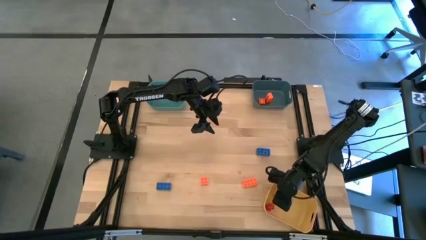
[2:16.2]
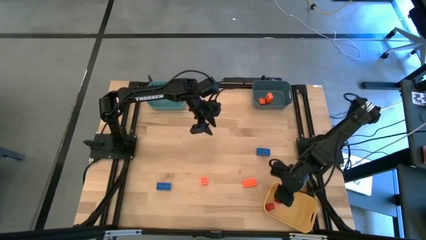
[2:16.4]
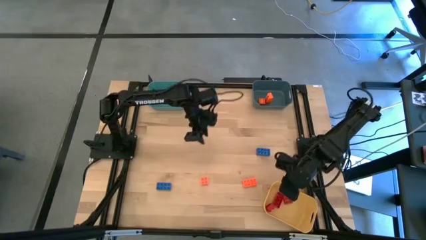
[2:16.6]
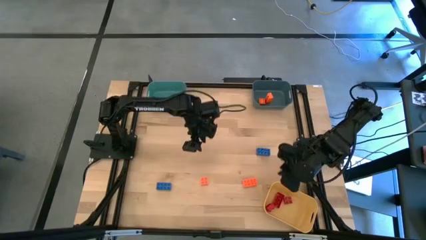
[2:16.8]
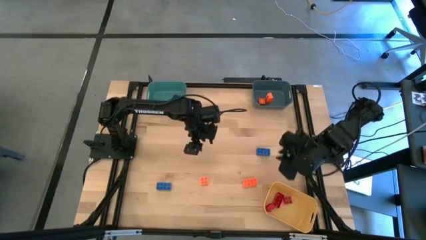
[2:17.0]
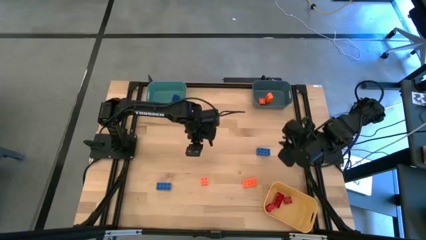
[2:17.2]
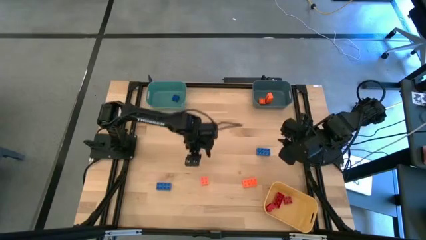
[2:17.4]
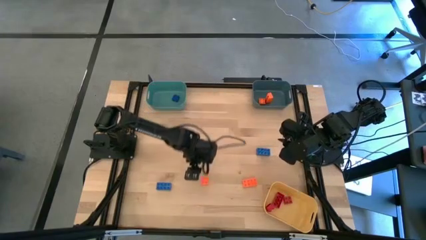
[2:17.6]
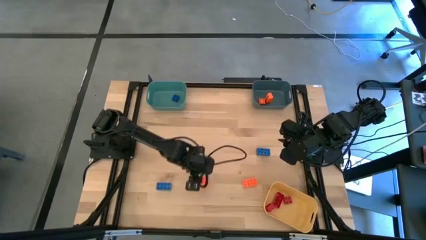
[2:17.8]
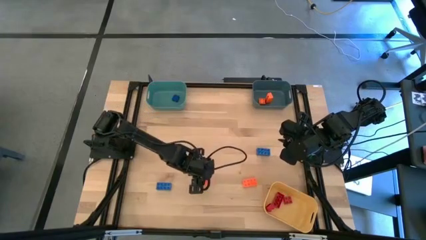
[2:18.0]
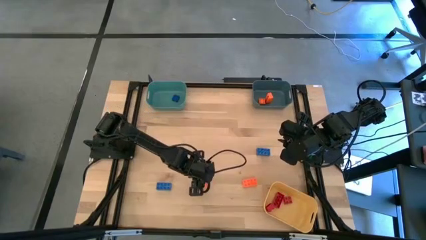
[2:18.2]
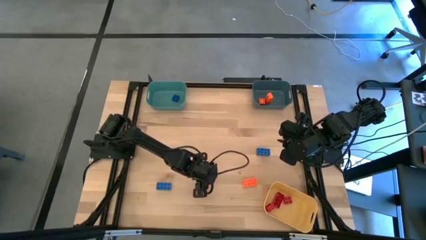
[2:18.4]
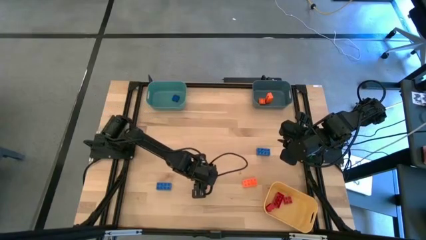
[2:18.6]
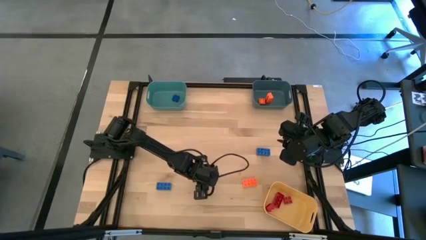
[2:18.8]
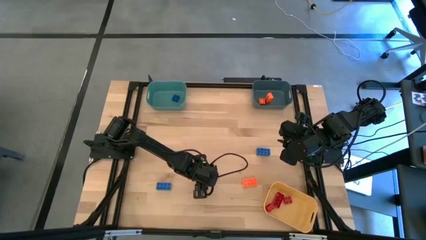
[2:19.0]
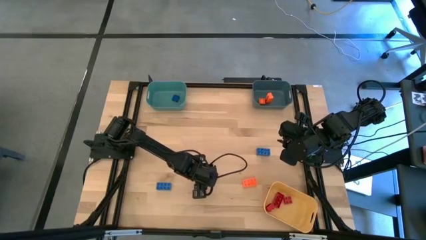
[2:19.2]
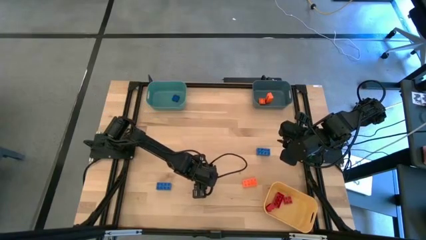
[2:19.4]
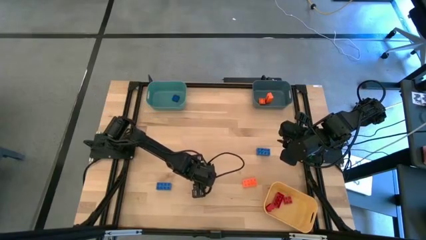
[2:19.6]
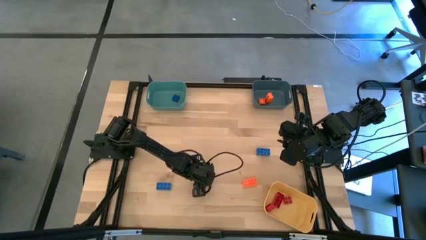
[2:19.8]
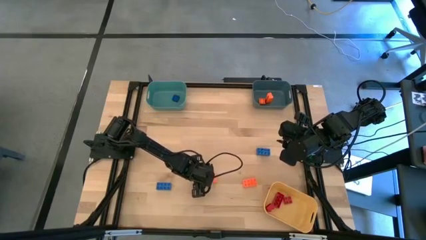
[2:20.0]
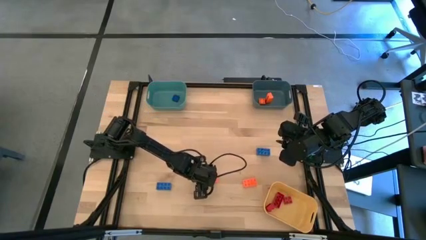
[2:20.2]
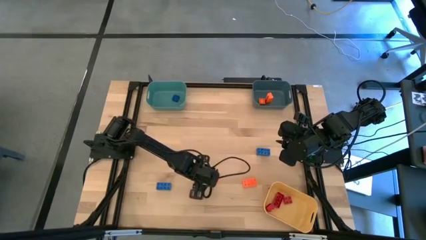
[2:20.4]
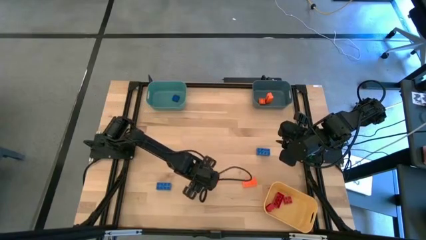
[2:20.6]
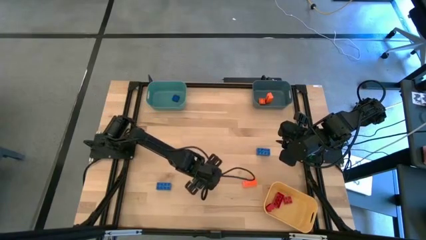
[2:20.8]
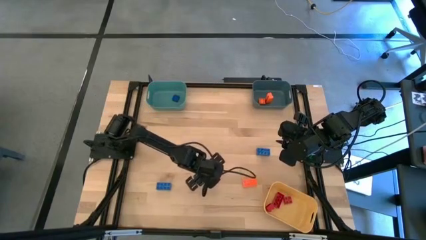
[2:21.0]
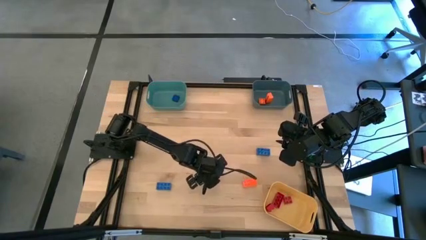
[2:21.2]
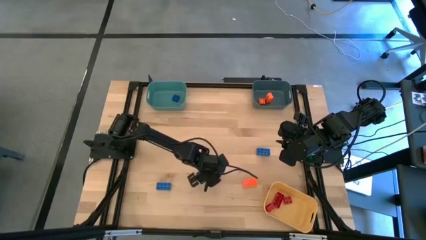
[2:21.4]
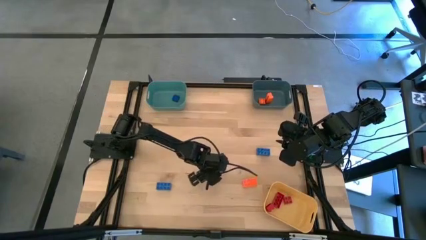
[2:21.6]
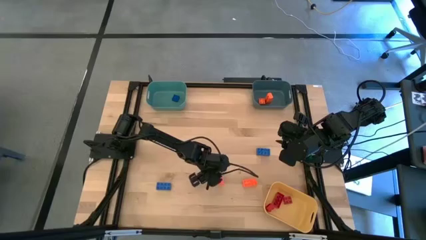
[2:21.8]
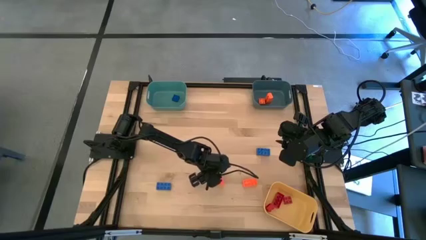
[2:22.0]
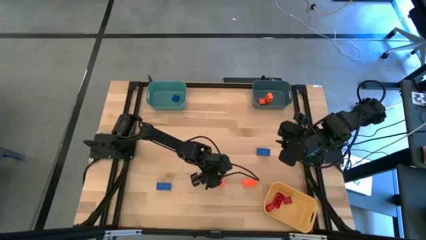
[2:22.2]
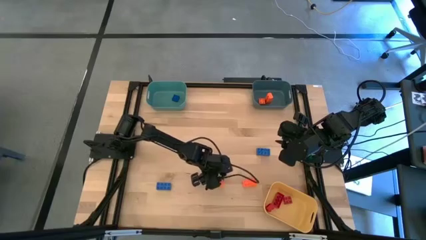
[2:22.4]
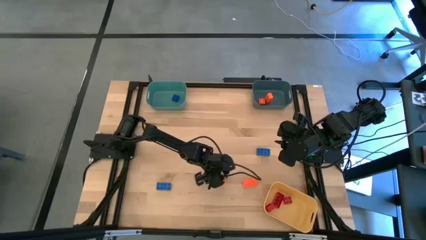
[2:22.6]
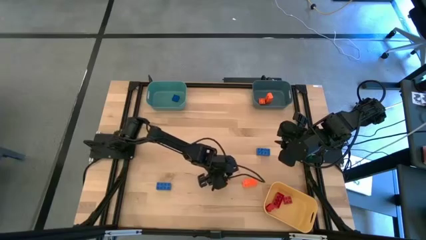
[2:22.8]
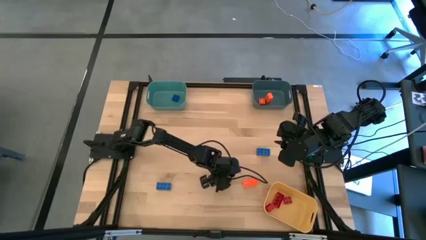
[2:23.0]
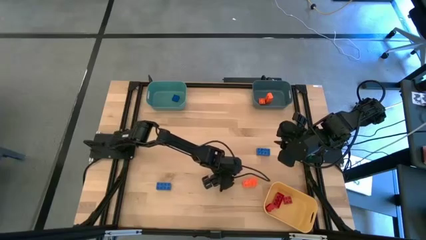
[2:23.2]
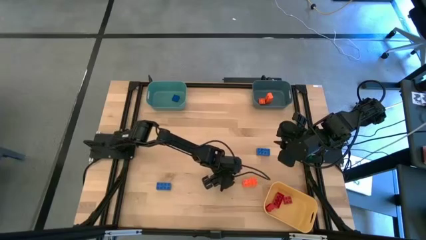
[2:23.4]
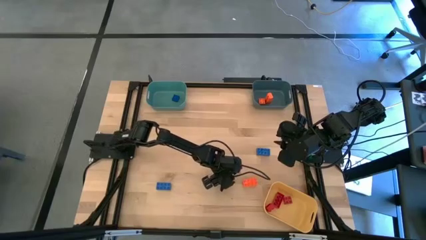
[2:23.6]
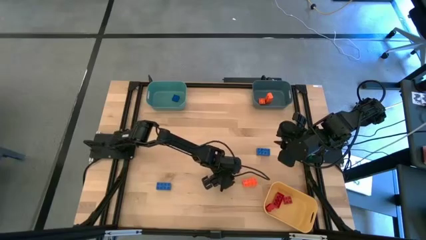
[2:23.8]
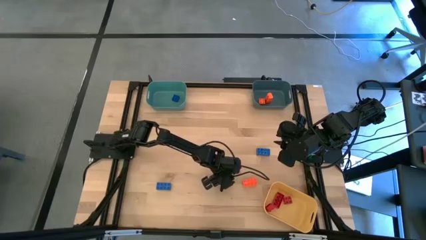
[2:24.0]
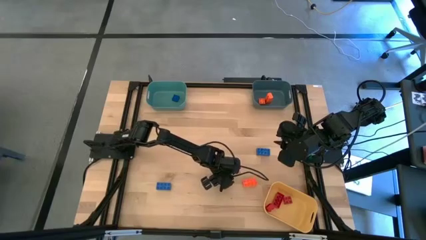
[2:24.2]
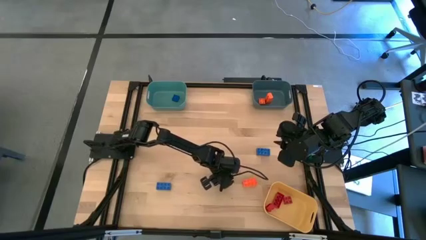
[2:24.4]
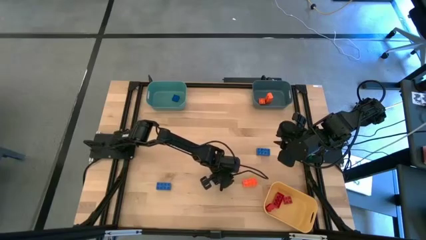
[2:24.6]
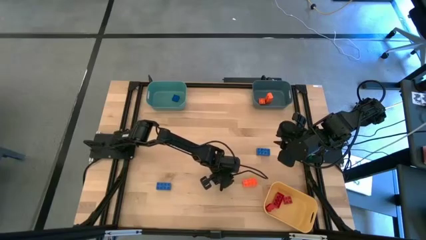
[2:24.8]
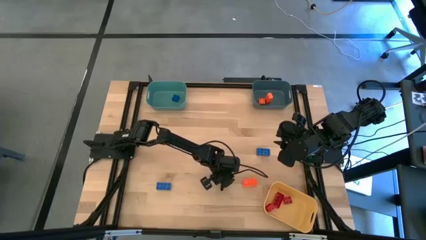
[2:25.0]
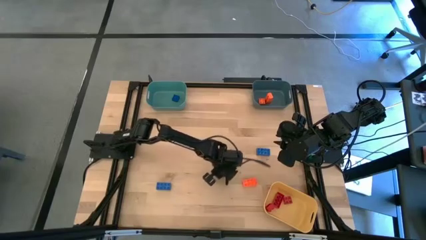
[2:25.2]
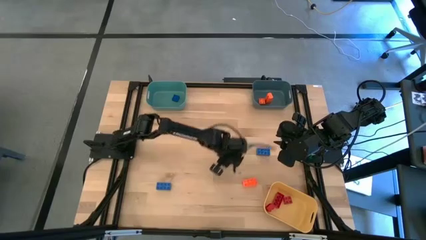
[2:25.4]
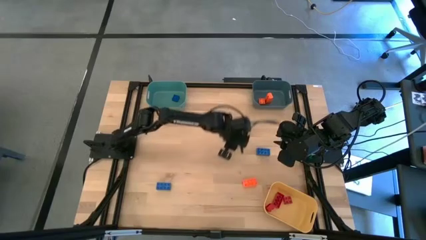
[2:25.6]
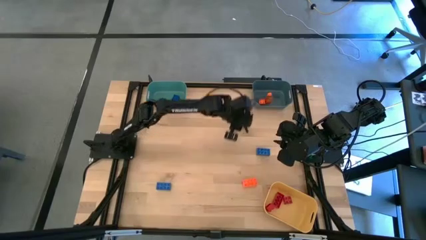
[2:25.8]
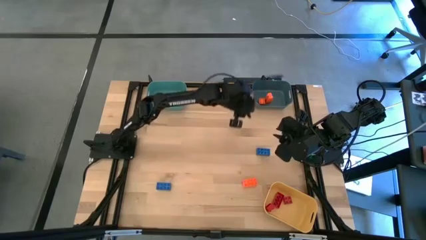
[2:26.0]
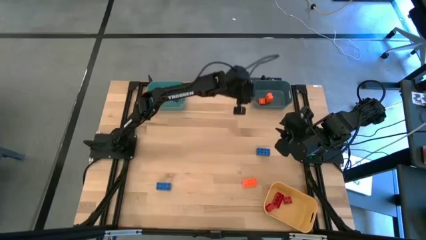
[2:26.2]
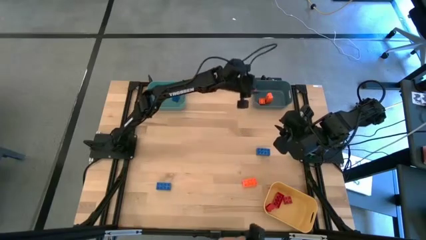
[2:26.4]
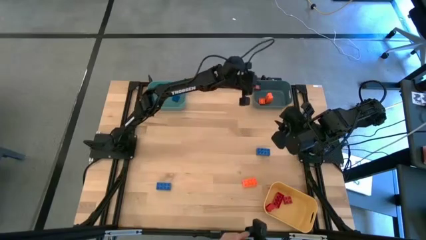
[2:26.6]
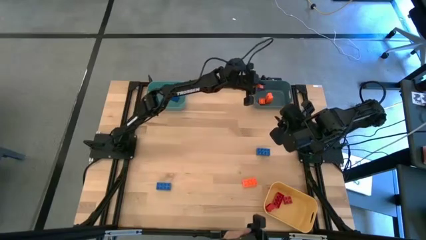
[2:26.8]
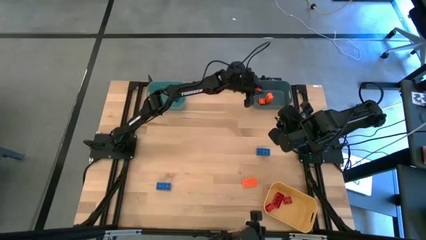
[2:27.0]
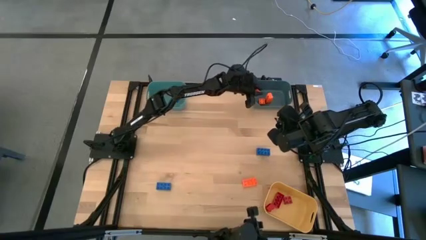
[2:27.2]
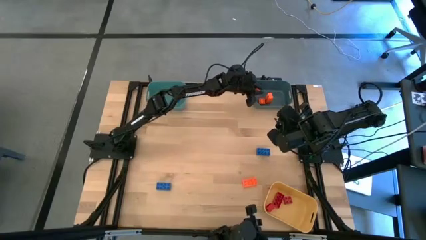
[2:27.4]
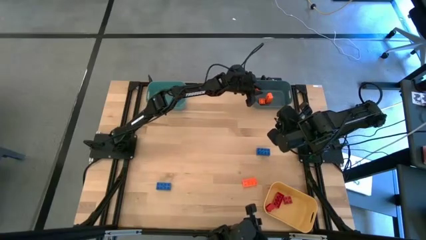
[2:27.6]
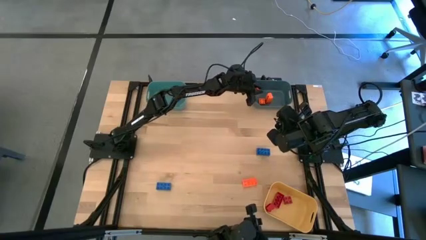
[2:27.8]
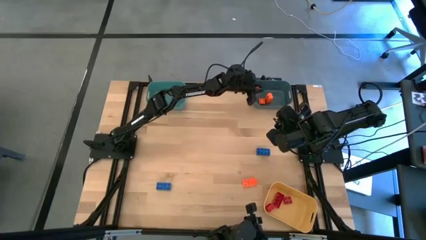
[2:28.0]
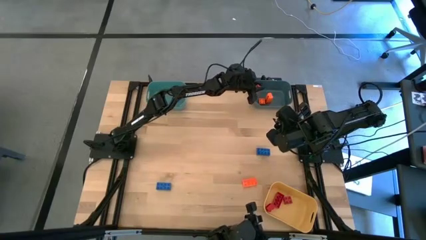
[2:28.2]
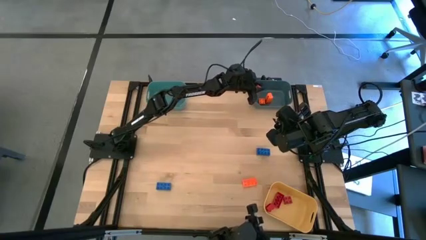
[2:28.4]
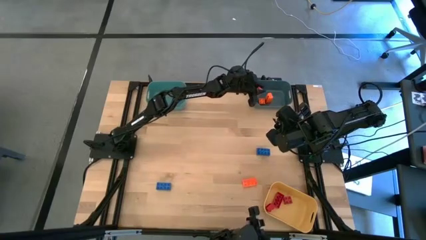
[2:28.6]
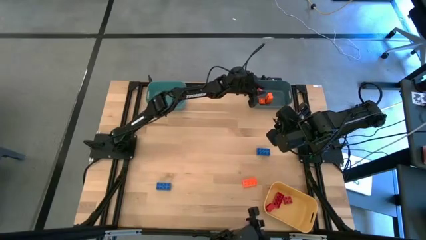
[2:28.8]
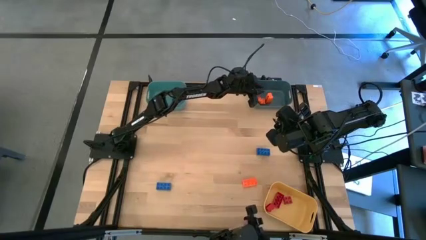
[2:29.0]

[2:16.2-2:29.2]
Task: Sort & place blocks by color
Put the orange game piece into the dark blue bin

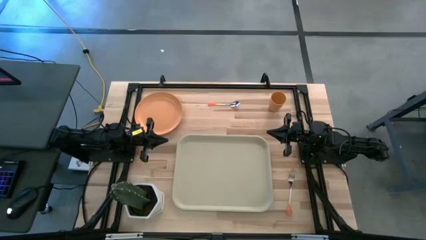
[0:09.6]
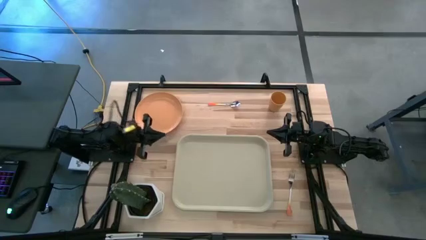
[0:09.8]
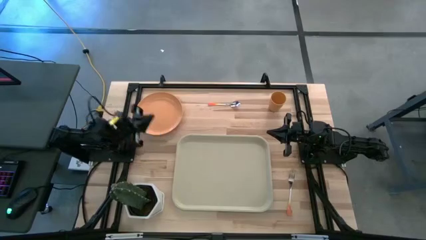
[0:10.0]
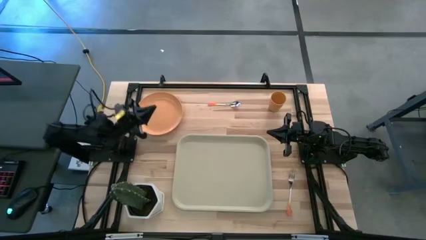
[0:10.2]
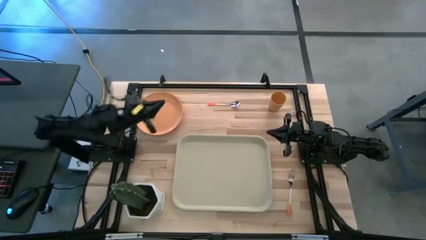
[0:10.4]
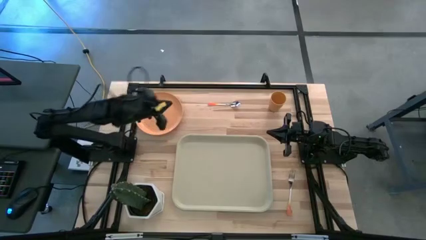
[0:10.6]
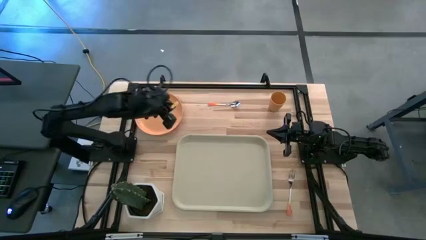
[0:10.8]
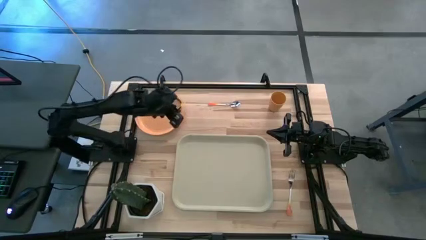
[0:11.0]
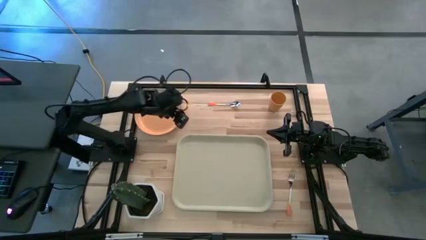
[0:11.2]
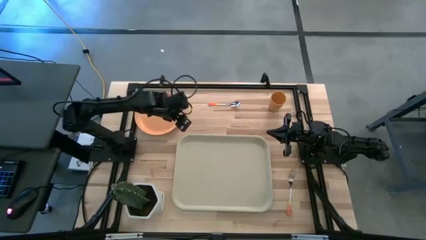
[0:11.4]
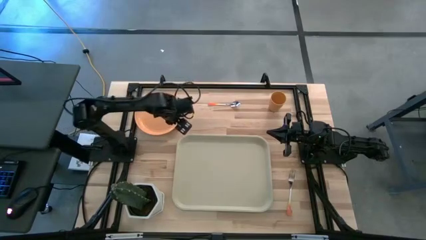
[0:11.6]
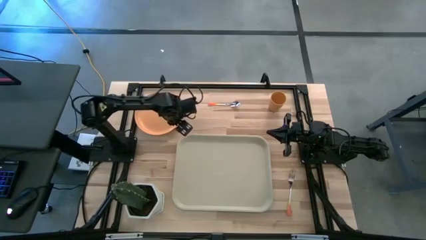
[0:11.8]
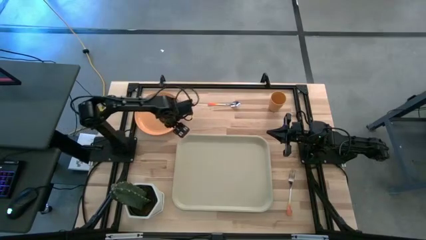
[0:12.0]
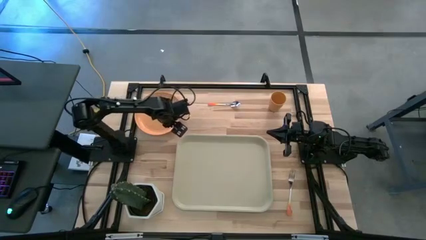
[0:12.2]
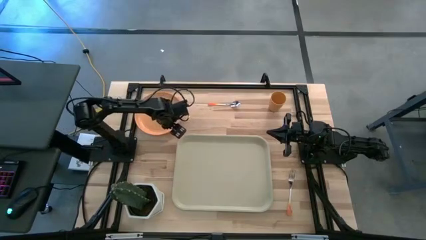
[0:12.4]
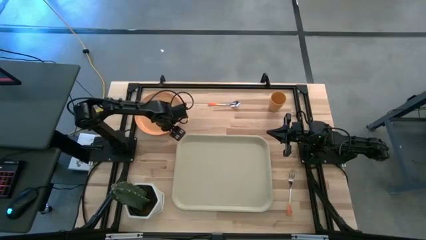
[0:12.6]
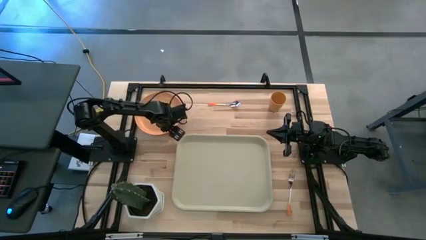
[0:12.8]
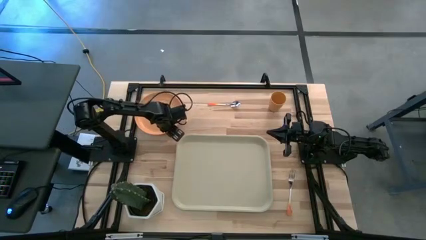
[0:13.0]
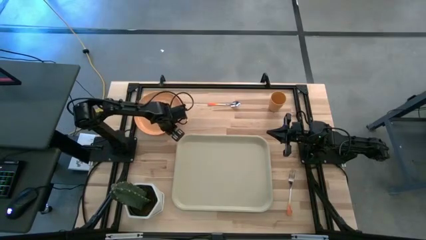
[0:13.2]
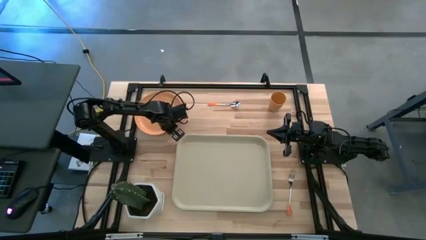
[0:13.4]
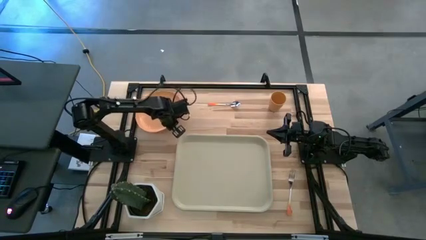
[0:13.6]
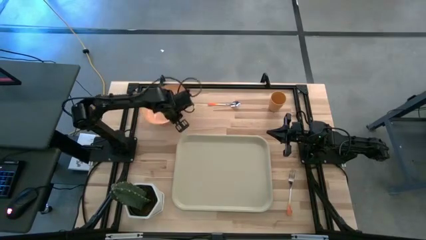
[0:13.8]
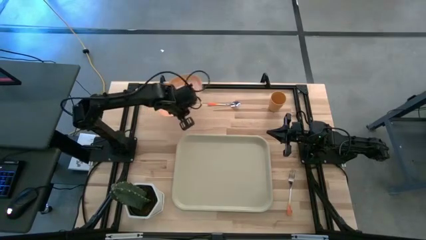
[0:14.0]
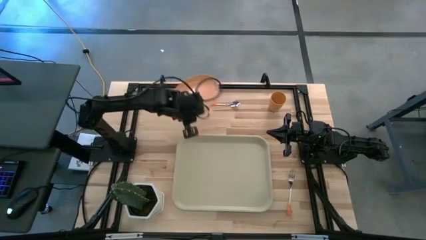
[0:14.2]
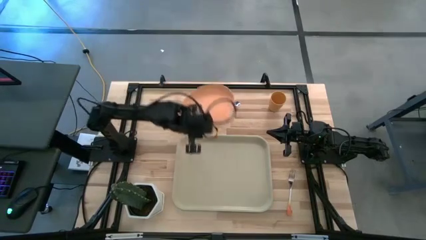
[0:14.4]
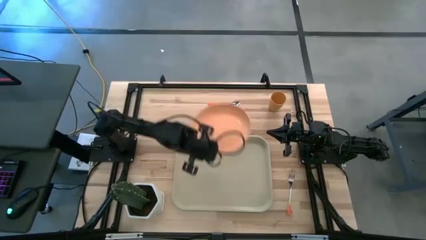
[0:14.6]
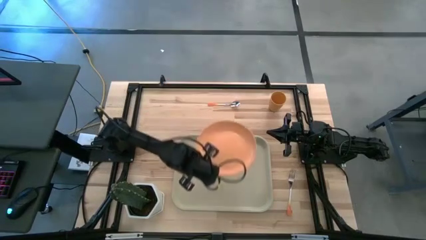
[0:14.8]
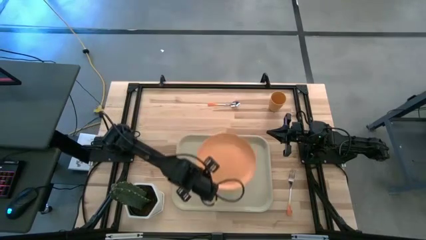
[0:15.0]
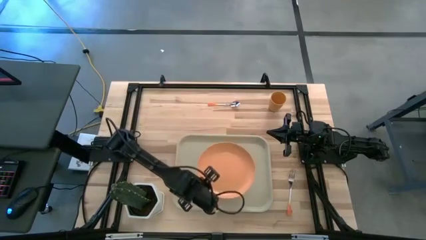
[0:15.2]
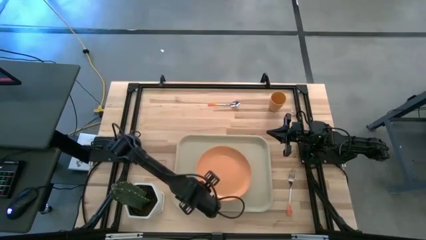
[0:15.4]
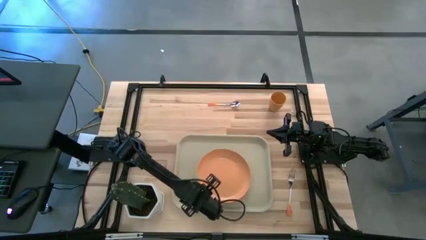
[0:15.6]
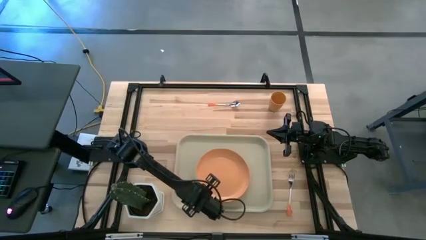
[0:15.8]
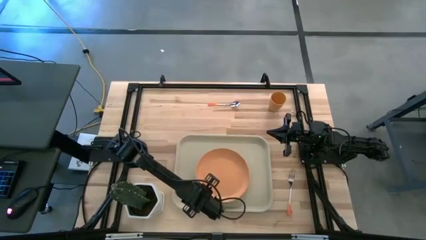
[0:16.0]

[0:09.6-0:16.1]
Task: Pick and place plate/cup/fork/spoon on tray
Put the orange plate on the gray tray
